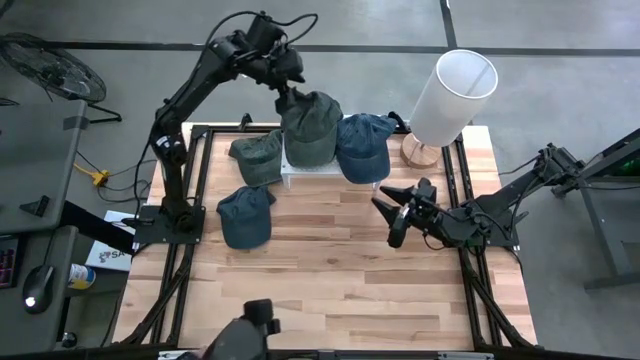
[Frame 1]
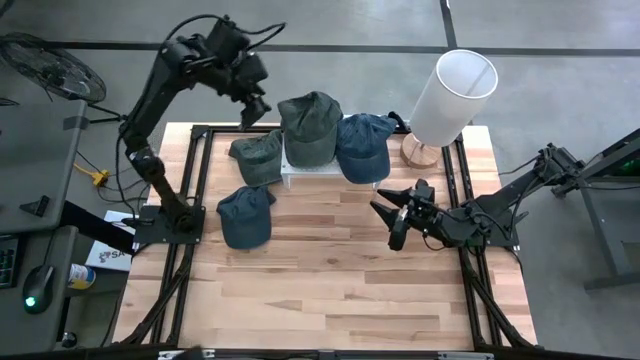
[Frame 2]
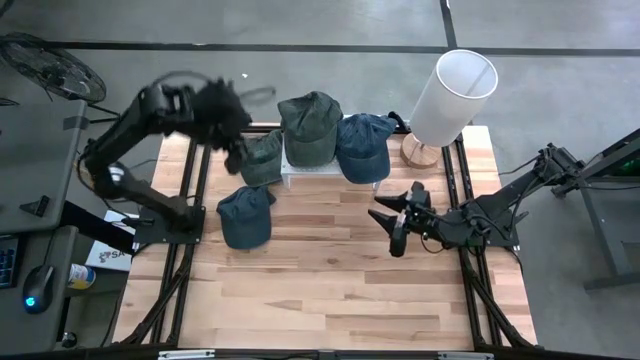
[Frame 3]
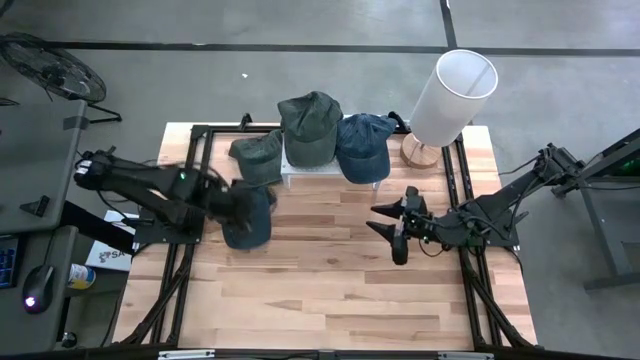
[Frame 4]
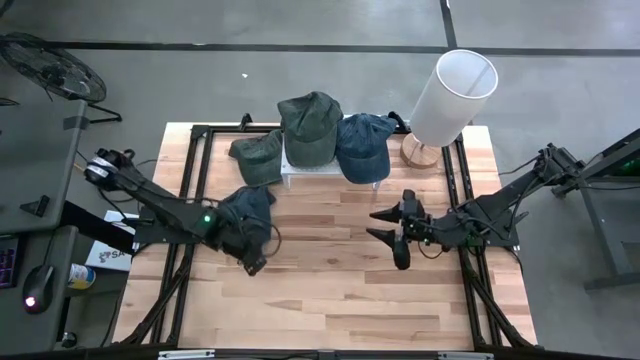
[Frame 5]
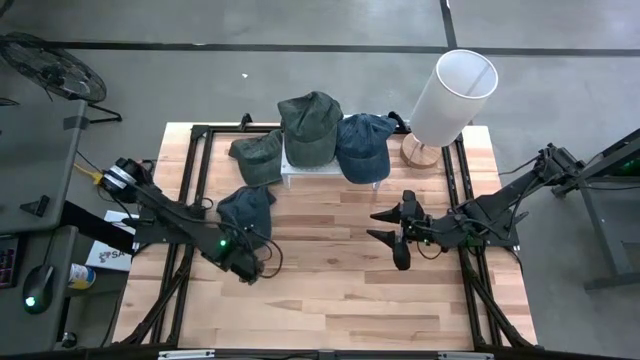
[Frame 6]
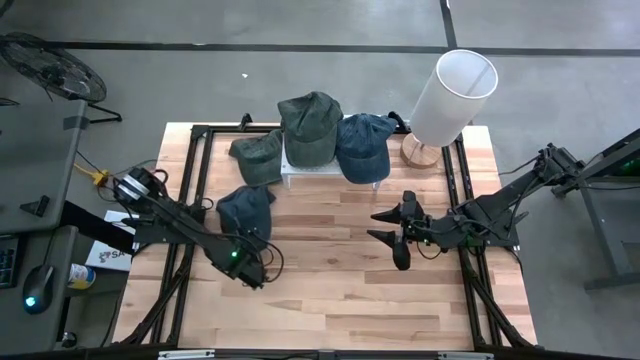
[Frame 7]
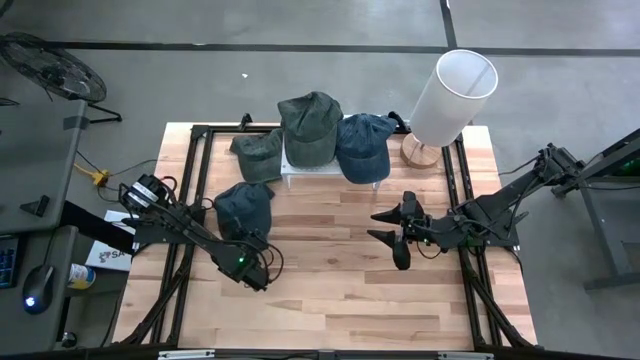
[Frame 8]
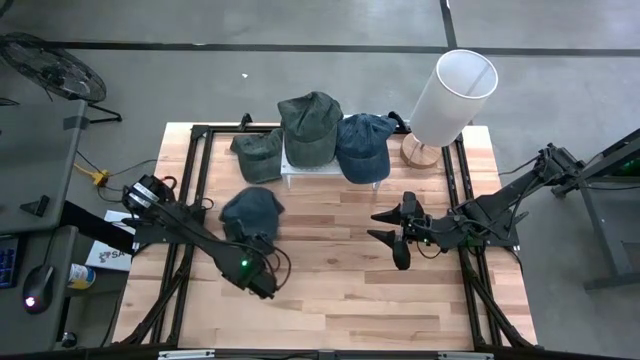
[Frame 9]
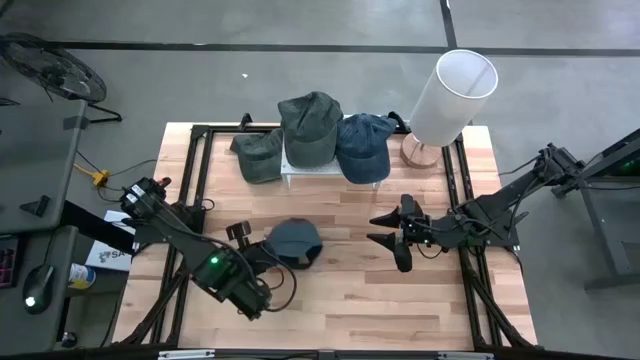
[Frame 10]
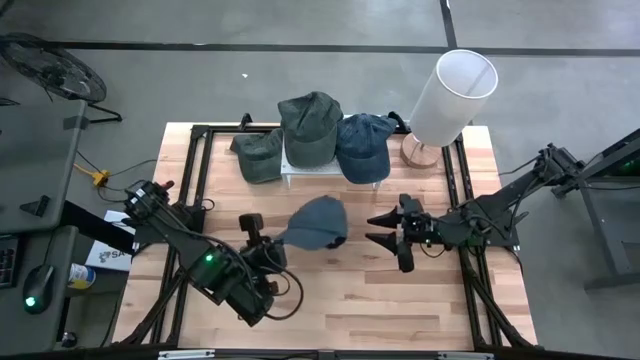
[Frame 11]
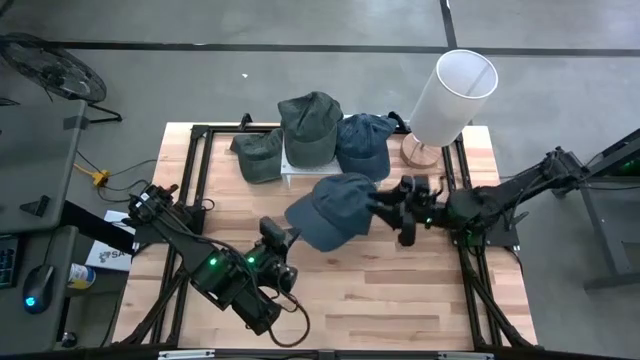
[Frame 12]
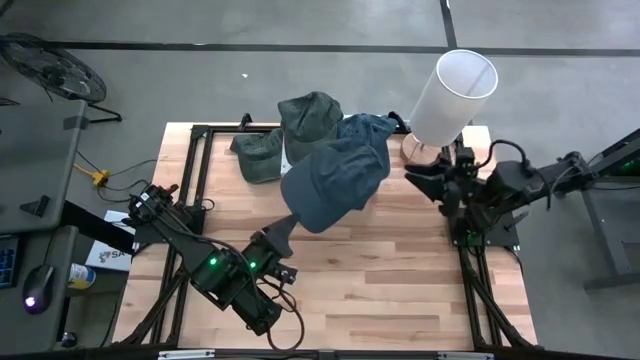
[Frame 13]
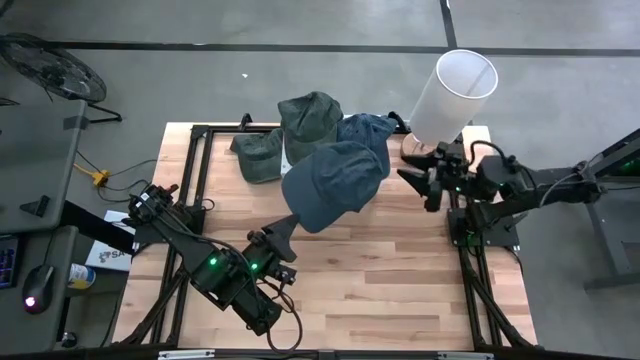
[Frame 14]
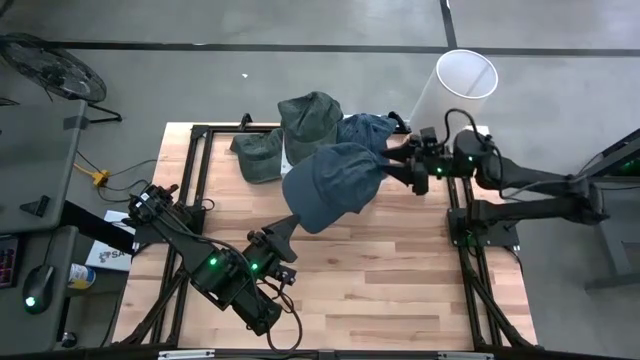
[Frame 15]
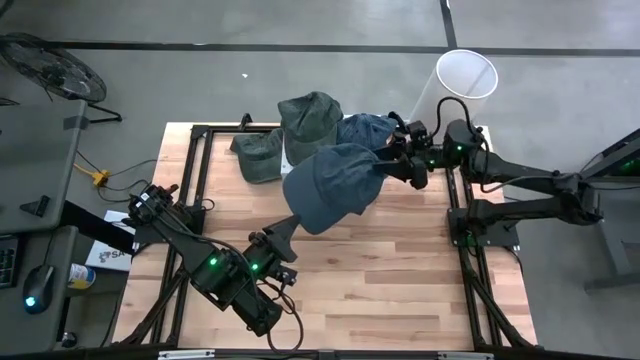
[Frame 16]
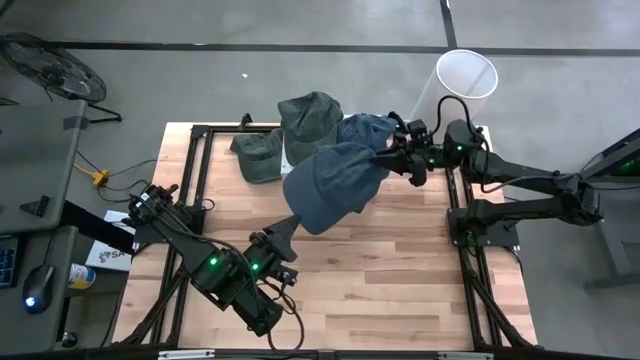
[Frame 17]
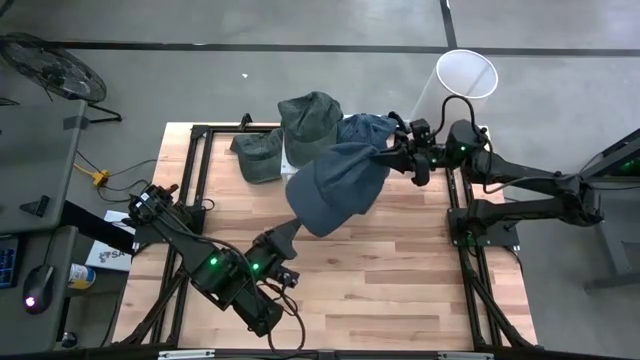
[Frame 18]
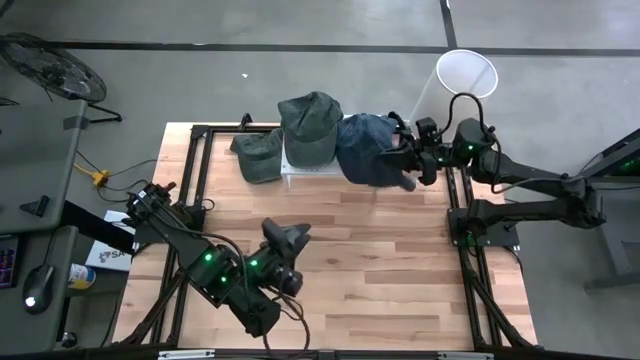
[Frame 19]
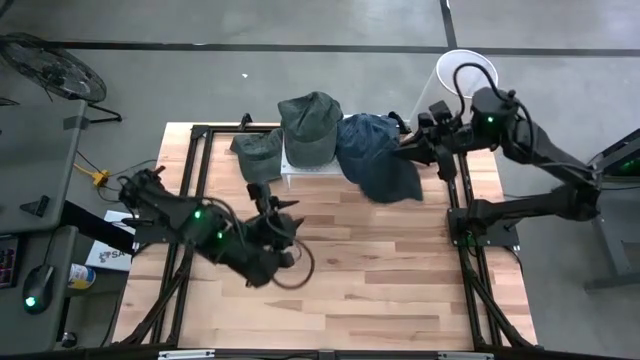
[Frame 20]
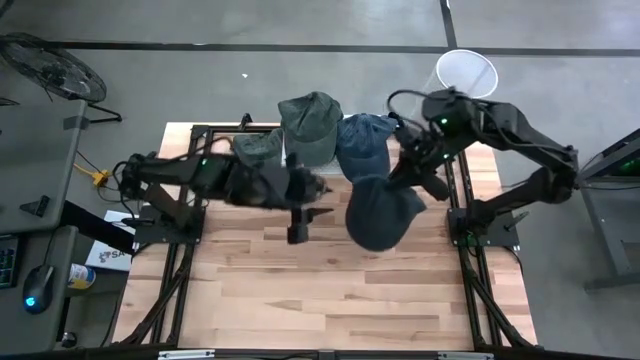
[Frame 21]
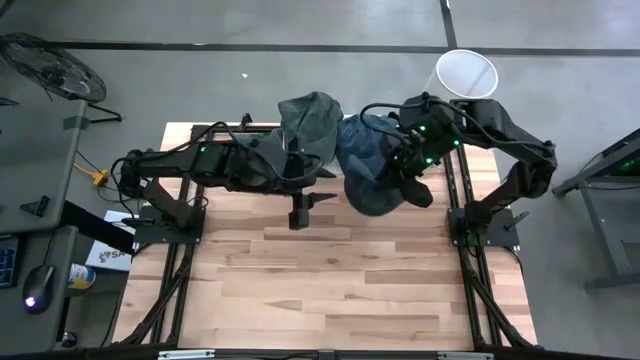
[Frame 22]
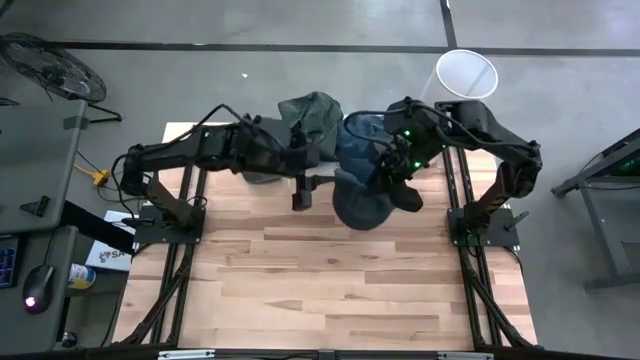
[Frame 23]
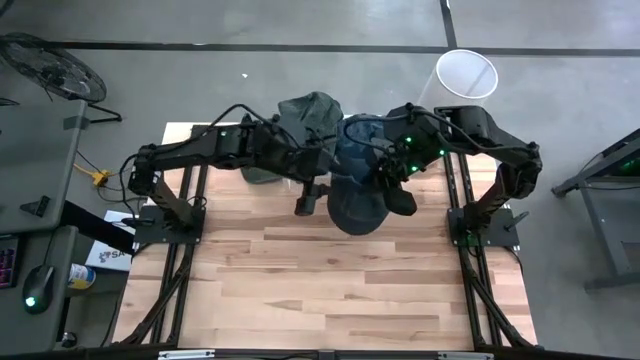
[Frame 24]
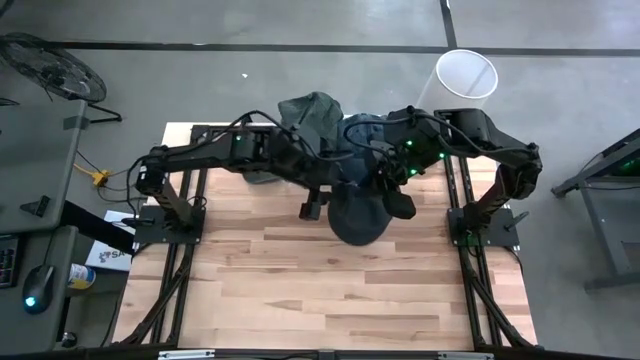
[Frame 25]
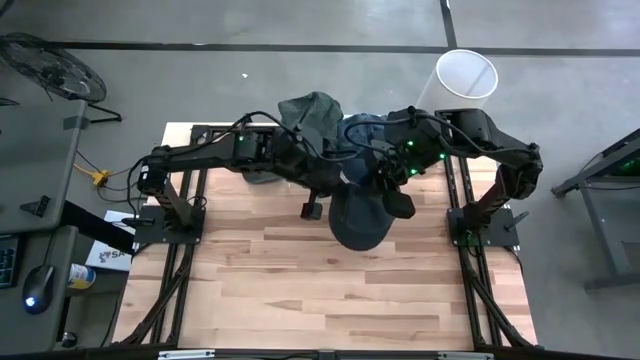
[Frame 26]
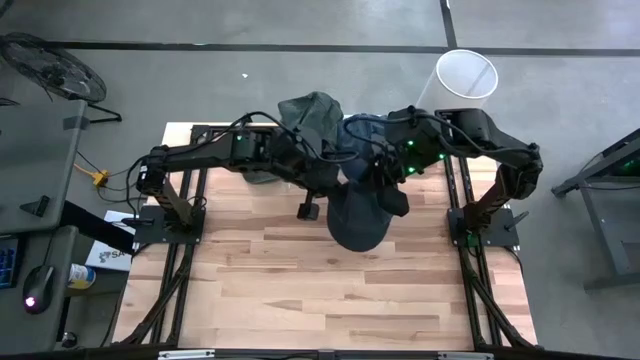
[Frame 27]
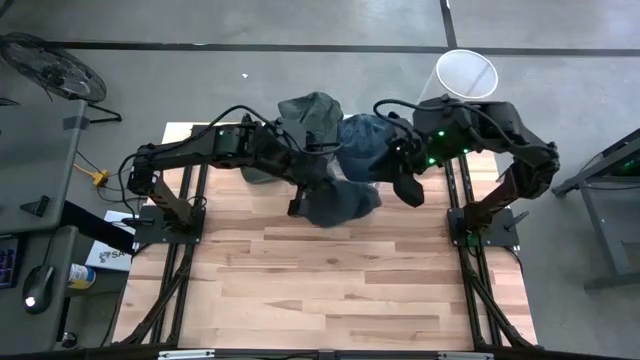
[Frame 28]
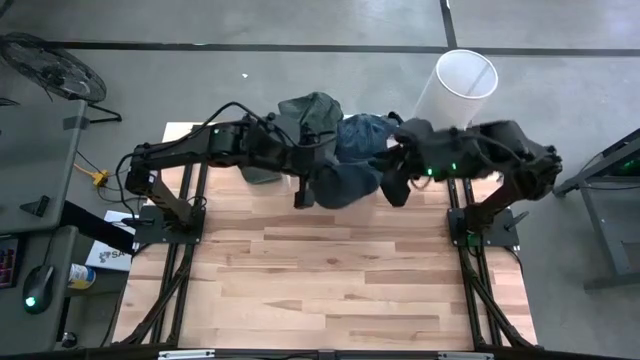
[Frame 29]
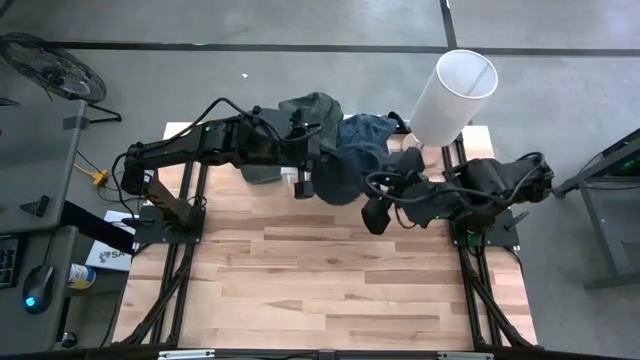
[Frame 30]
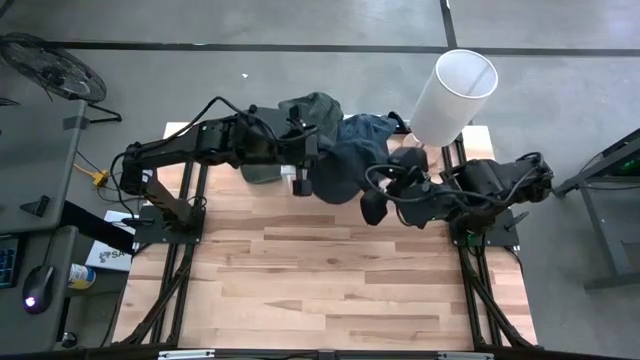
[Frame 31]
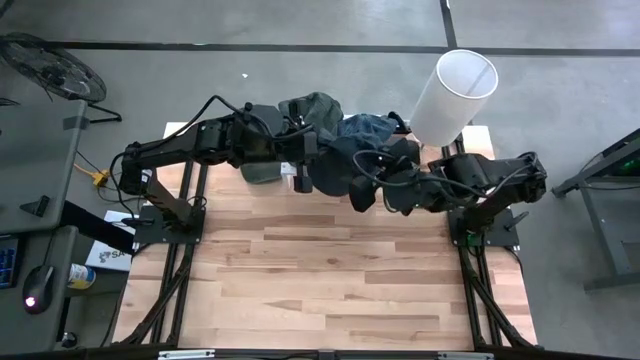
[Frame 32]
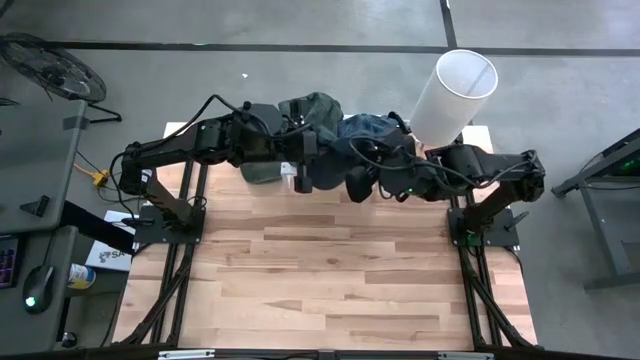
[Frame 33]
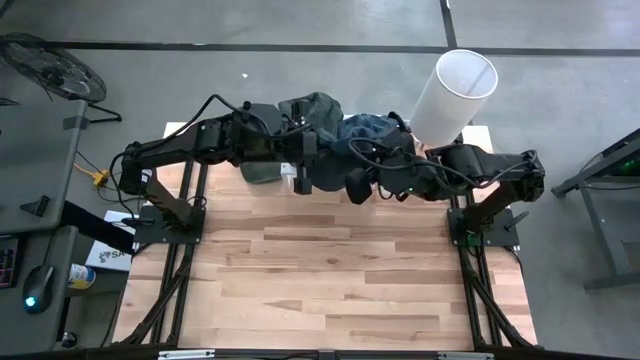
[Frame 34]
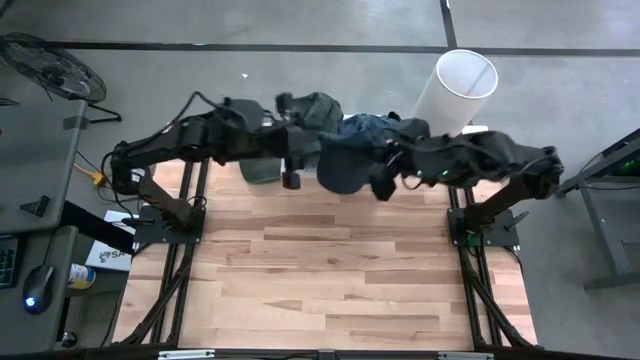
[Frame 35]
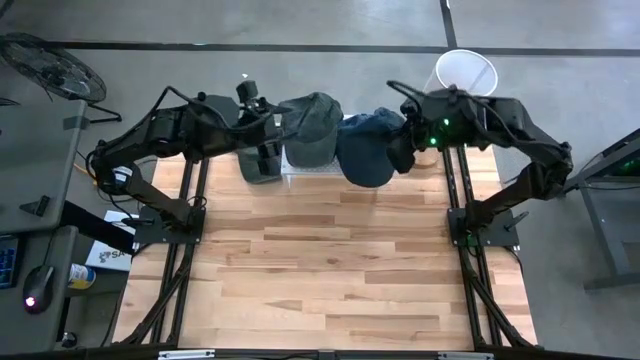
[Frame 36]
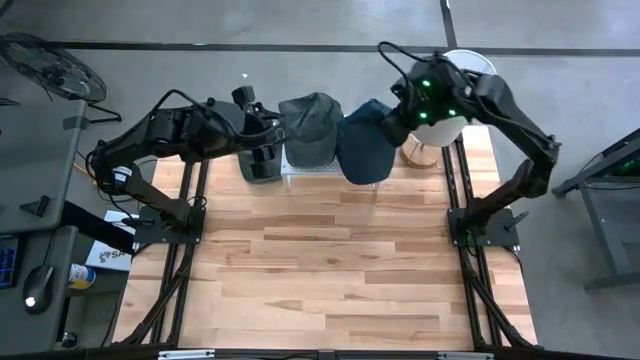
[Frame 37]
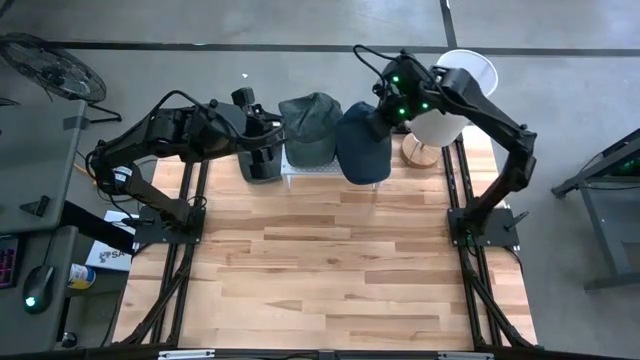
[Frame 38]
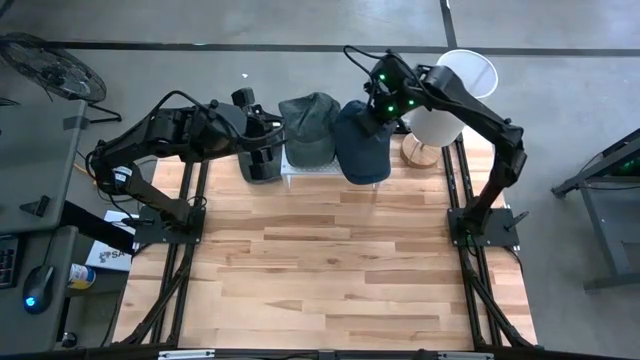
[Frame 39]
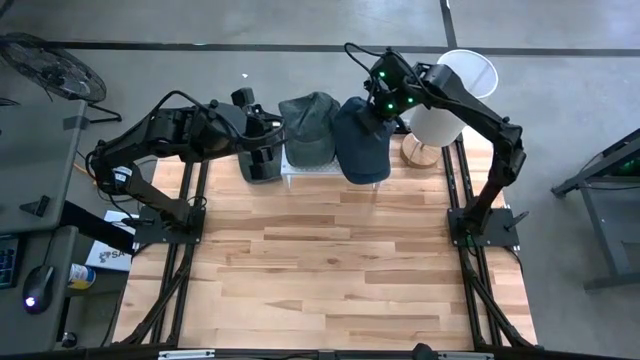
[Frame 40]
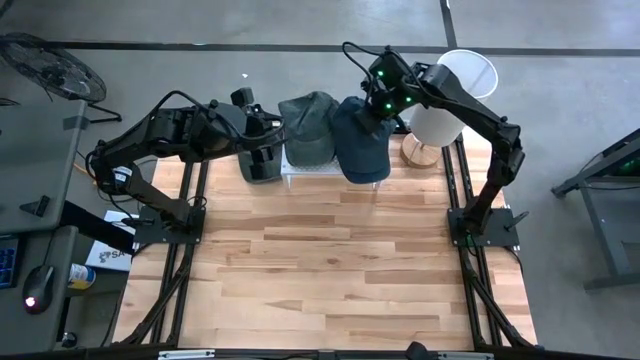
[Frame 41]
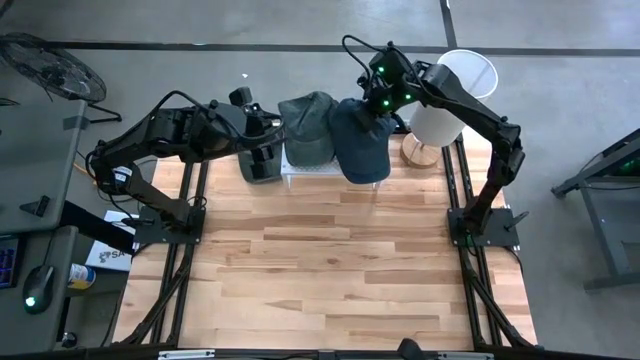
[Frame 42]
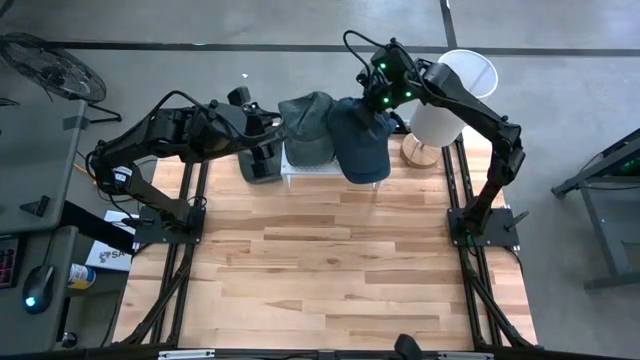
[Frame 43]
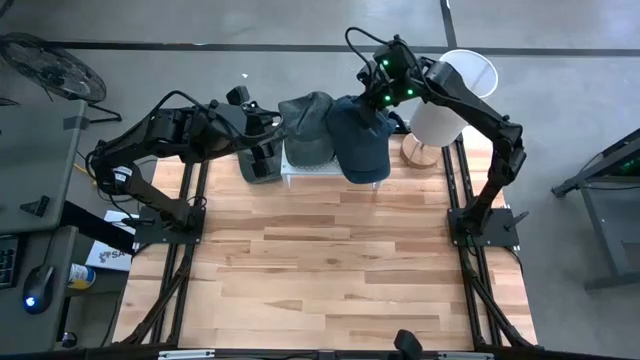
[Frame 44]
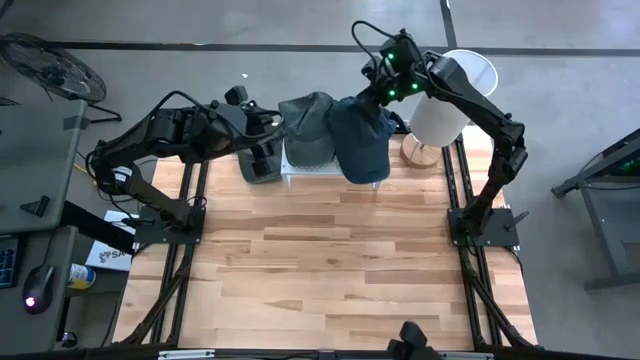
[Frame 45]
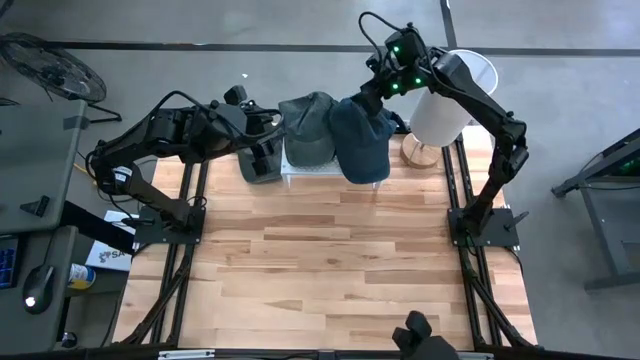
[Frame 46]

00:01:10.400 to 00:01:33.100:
Task: Pick & Place hat
Stack the dark blue cap on the dark blue cap on the shelf
